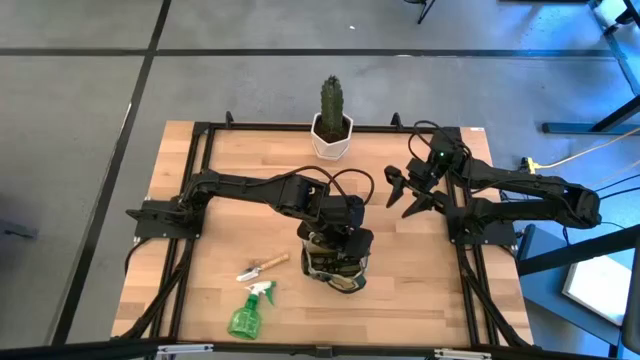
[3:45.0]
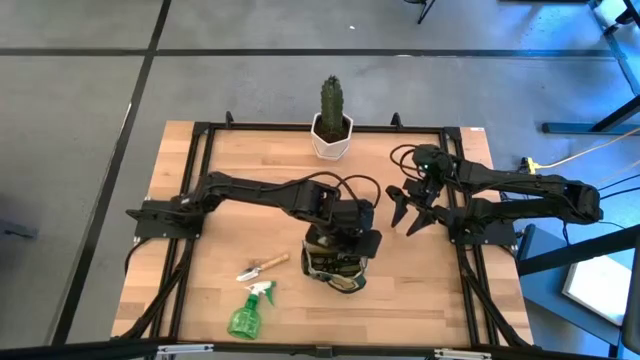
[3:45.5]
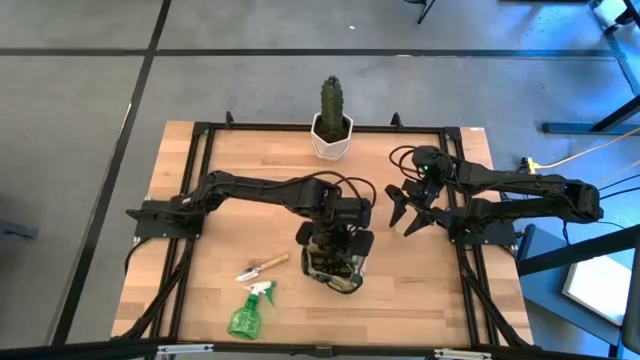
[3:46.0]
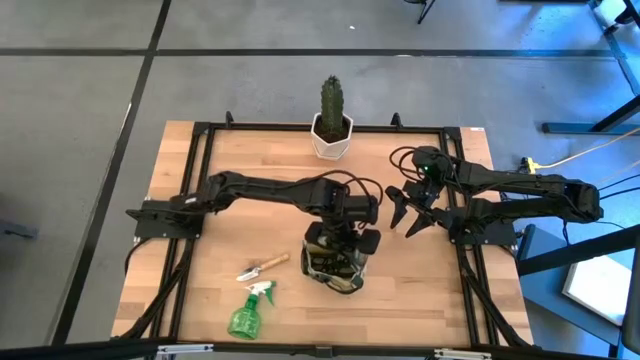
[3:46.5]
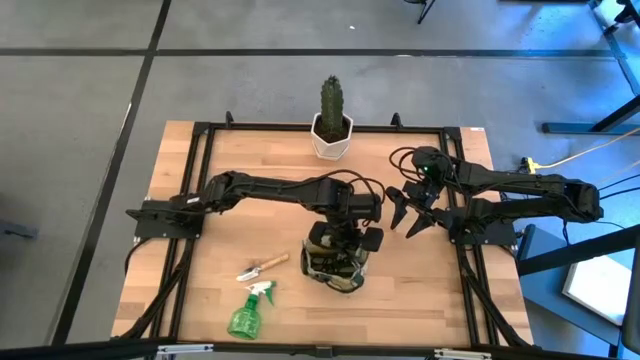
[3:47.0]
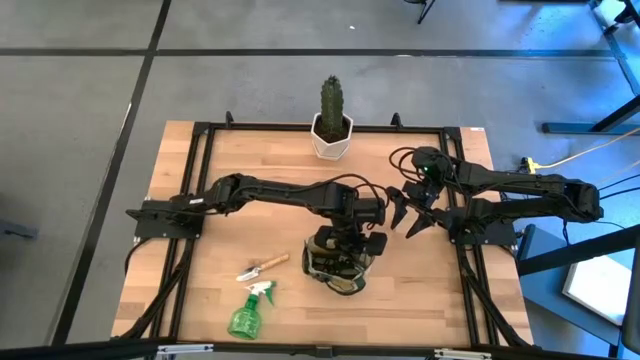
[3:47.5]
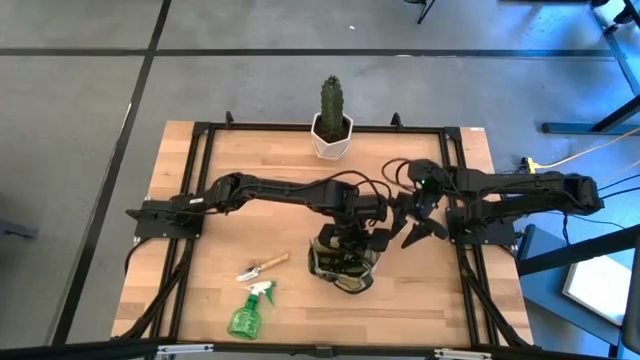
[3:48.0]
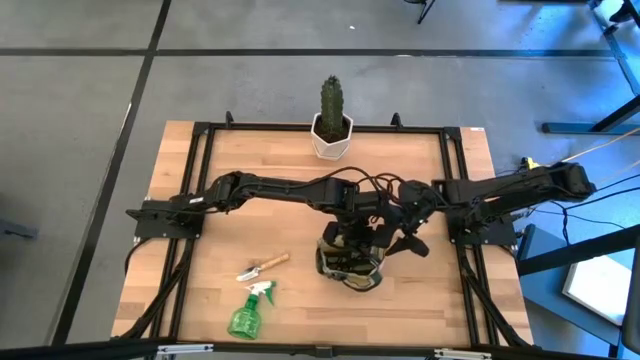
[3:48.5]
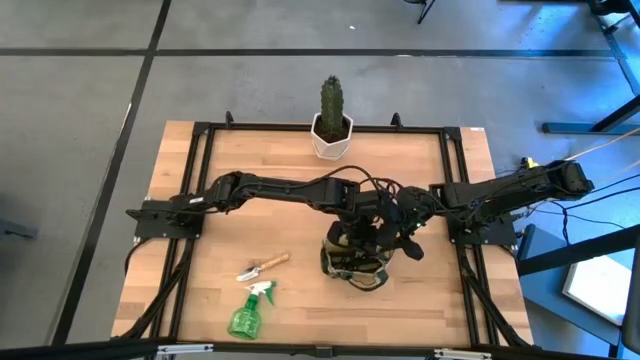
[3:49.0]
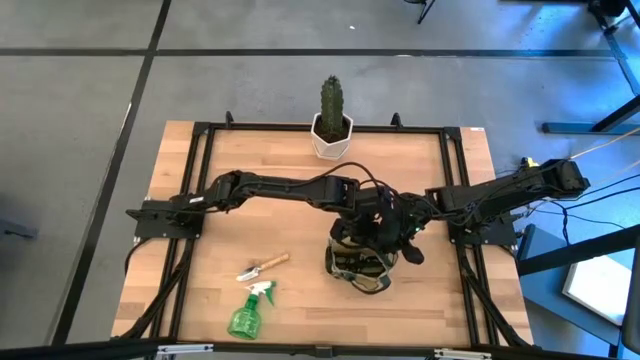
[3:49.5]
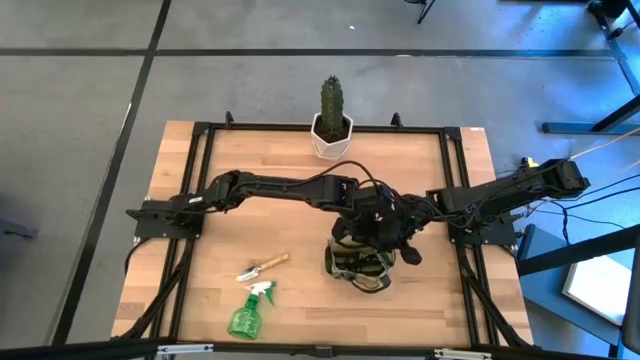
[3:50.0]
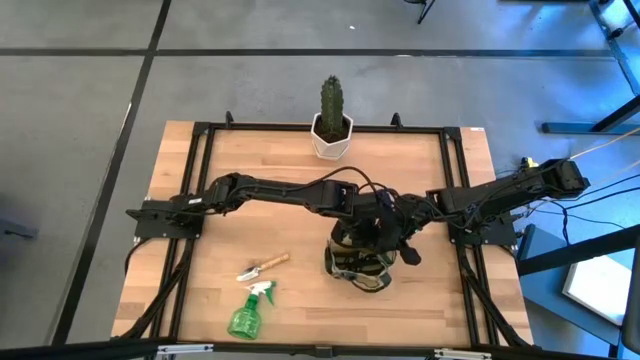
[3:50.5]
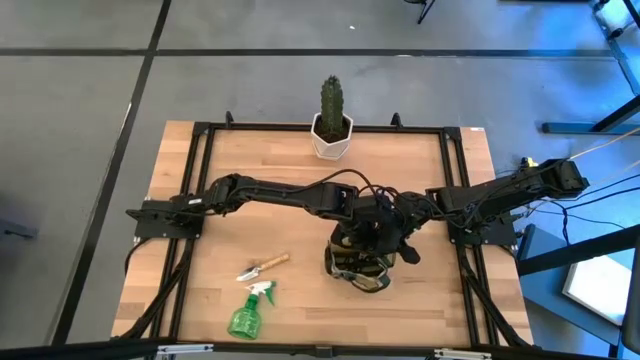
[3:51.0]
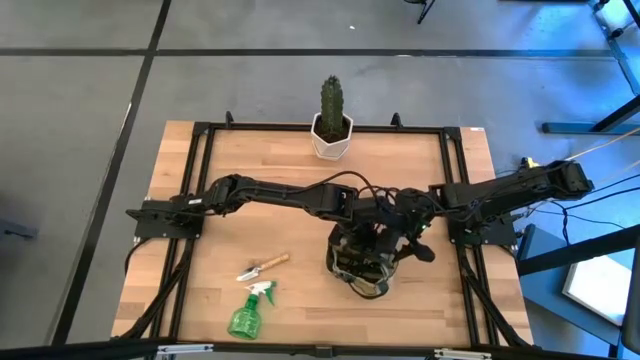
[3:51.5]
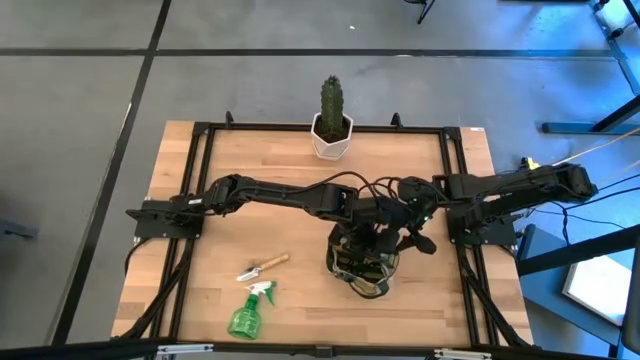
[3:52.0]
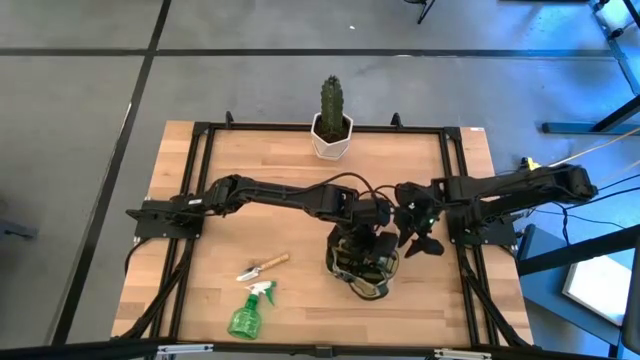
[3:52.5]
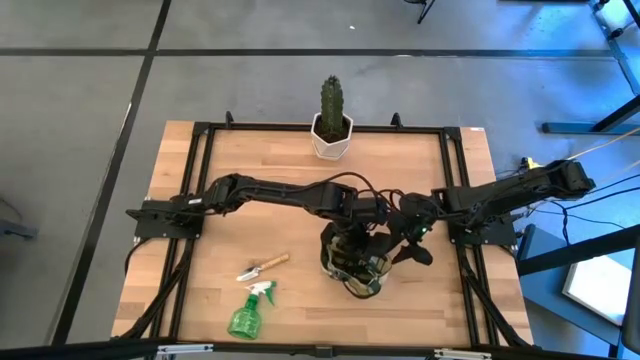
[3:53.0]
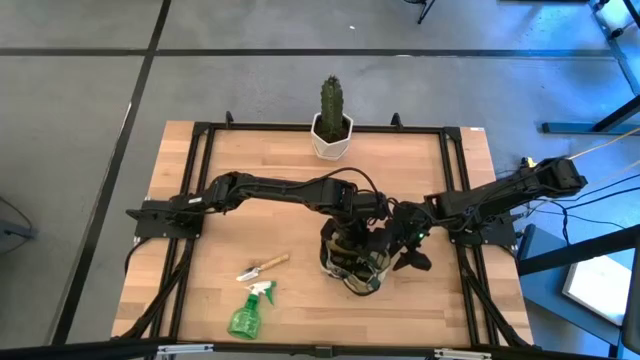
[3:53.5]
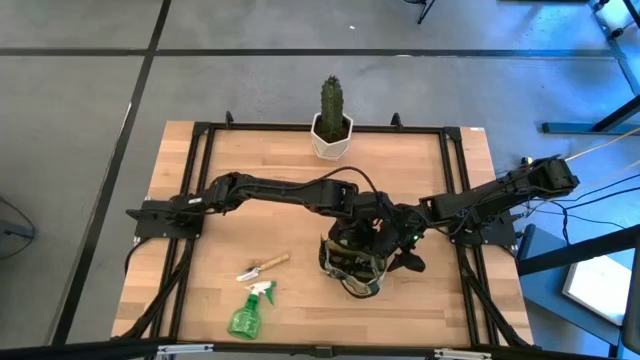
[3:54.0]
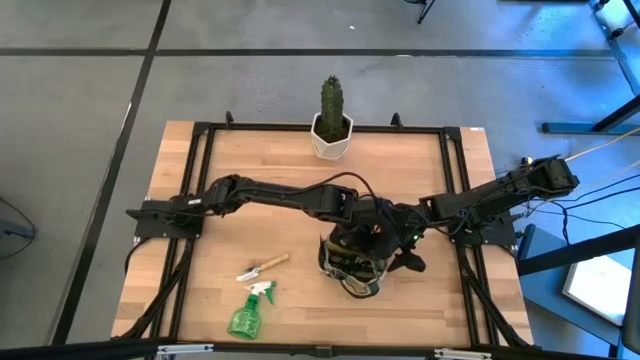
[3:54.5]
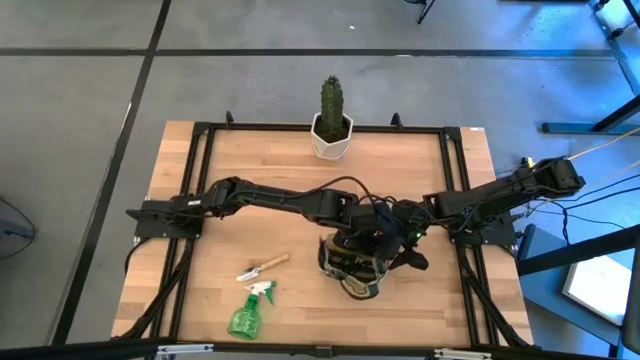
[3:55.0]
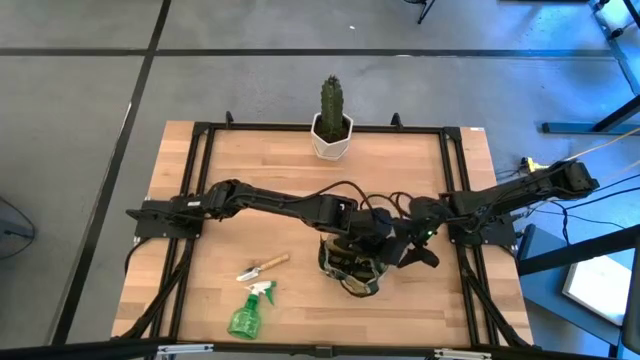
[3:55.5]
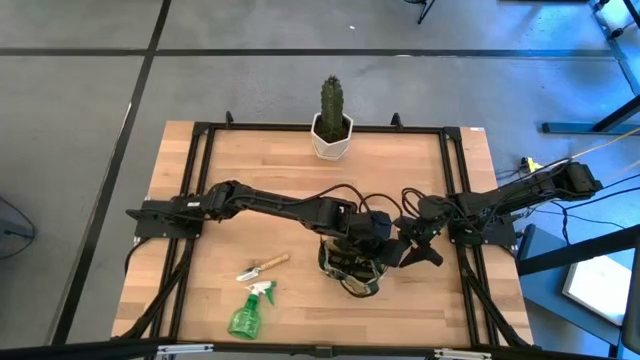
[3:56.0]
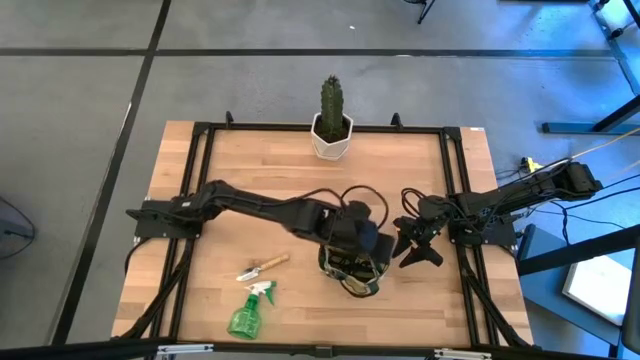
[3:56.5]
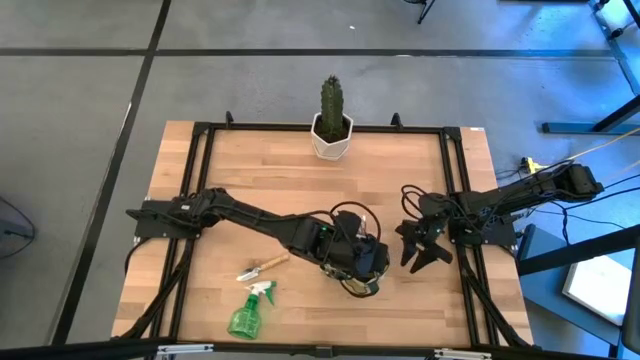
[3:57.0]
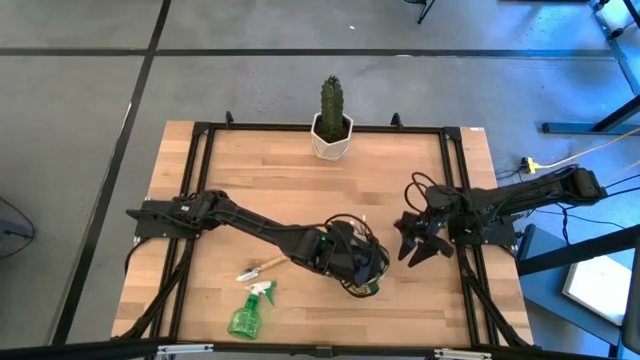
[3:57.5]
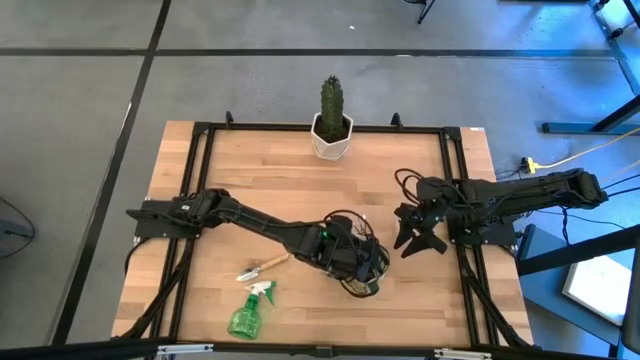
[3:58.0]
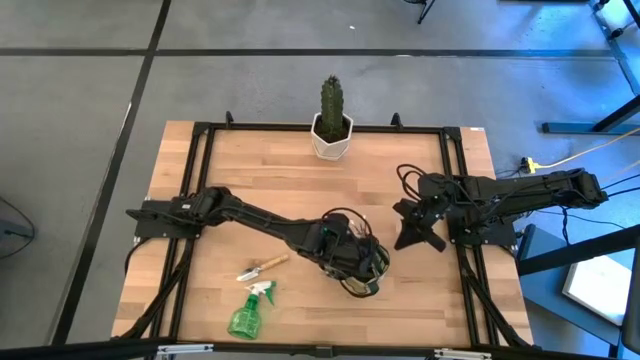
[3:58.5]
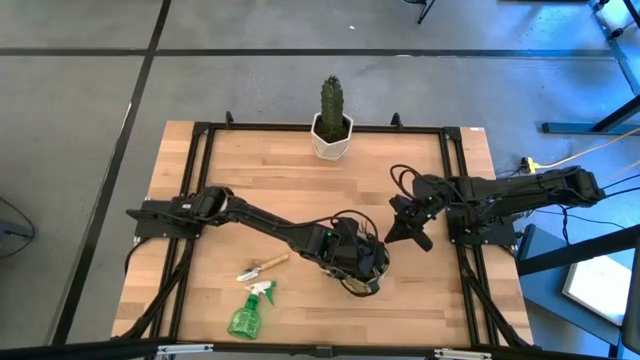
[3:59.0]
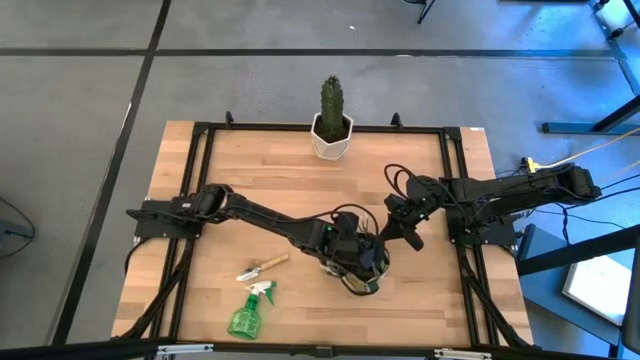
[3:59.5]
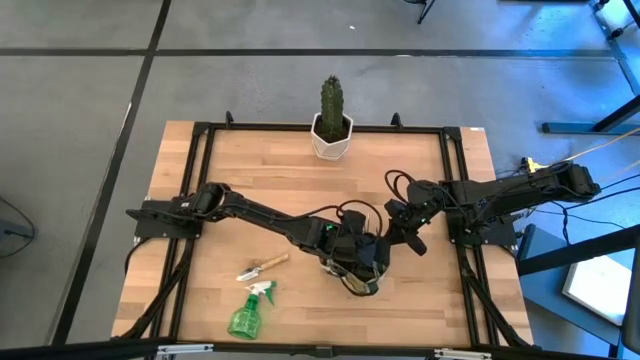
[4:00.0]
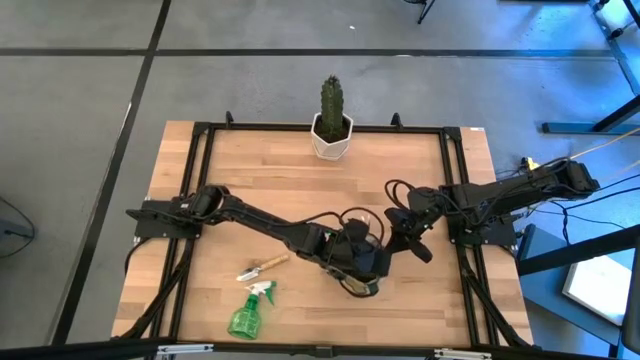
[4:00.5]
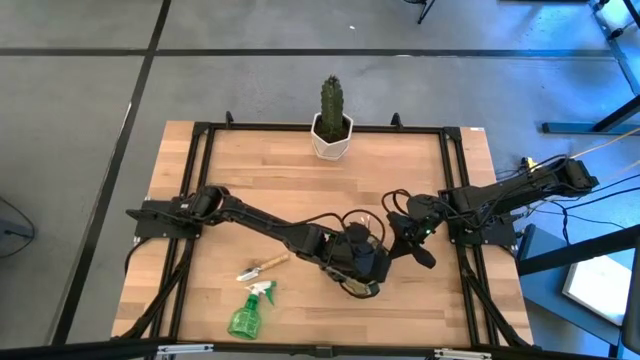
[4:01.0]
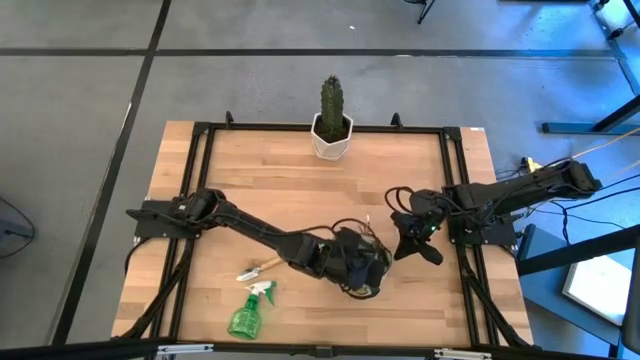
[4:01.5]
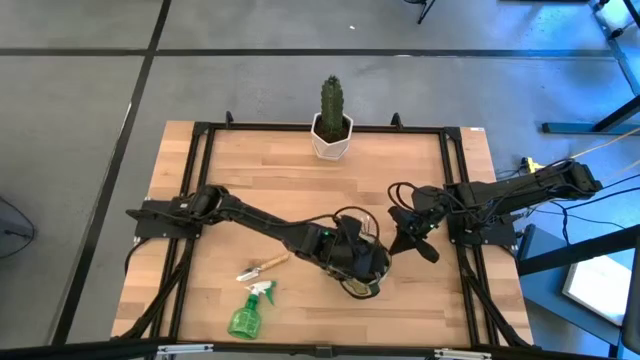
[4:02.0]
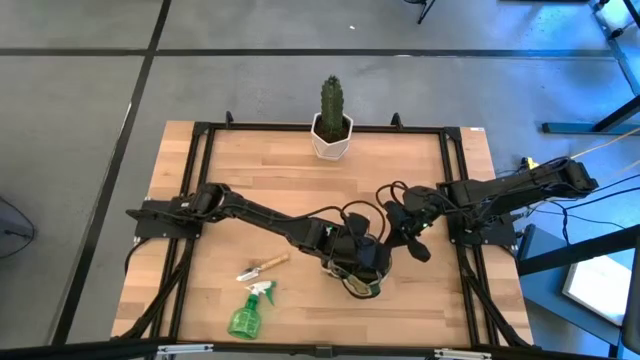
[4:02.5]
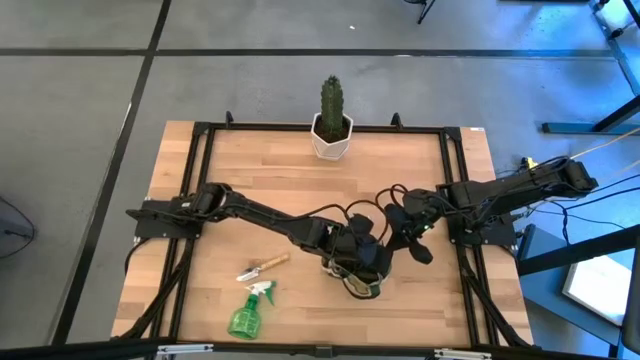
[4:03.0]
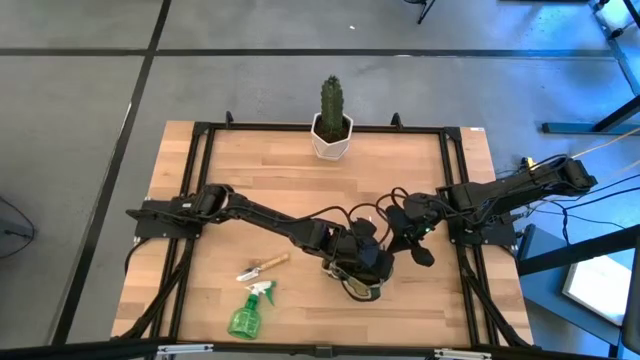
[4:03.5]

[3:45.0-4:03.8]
Task: Pick & Place Garden tools in Gardening bag
Put the green fruit pruner into the green gardening bag

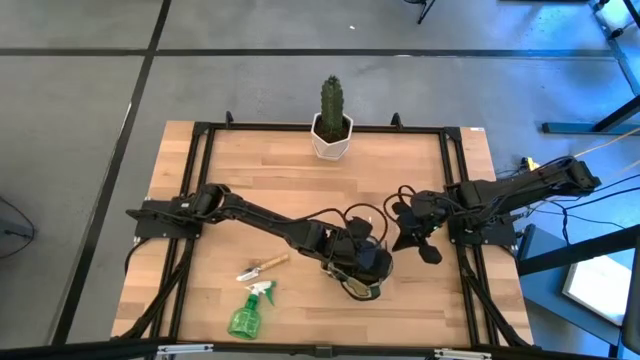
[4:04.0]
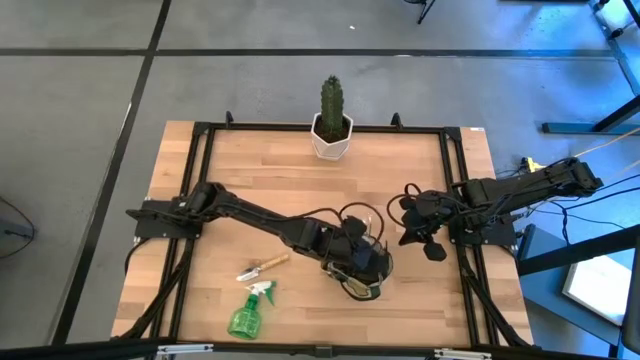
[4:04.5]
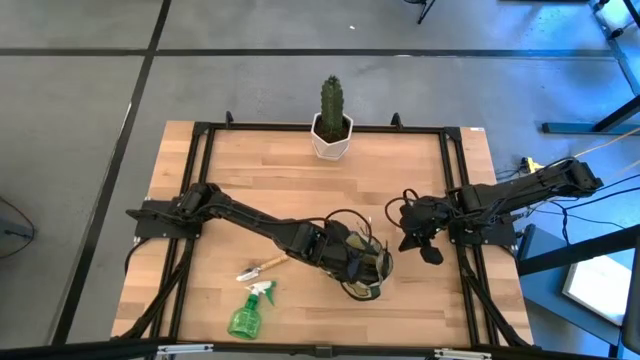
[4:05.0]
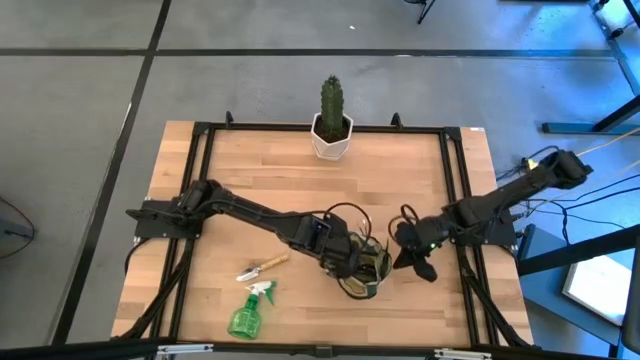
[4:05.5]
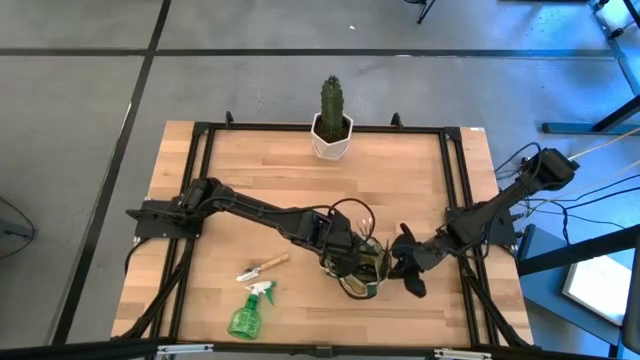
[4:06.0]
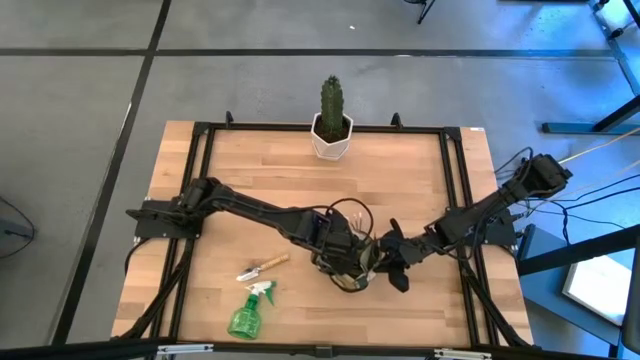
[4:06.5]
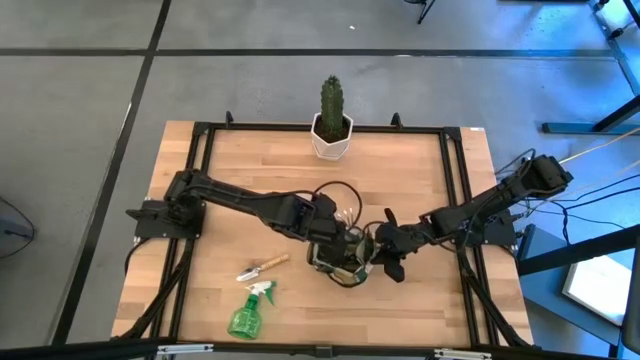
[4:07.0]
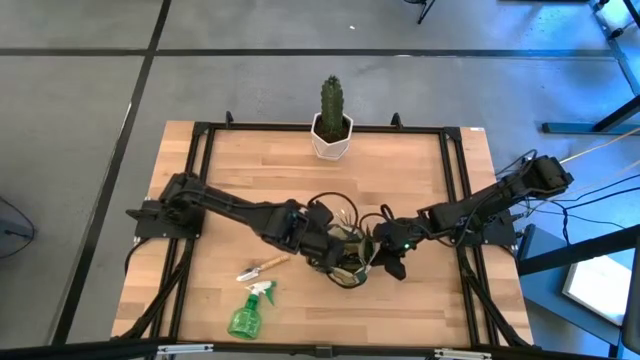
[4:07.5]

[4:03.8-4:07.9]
Adjust the green gardening bag
